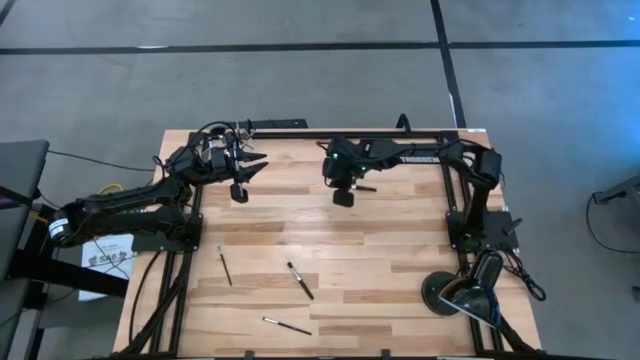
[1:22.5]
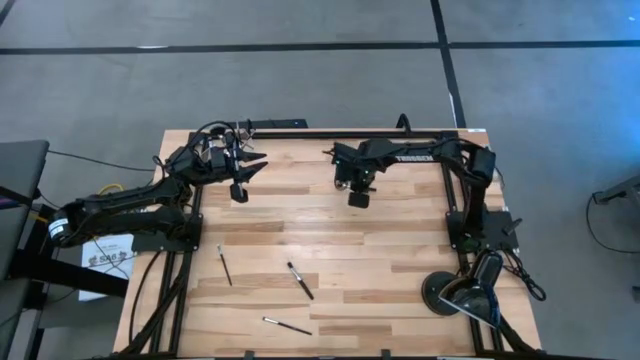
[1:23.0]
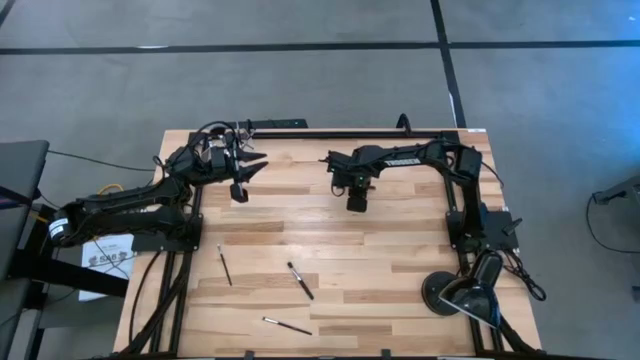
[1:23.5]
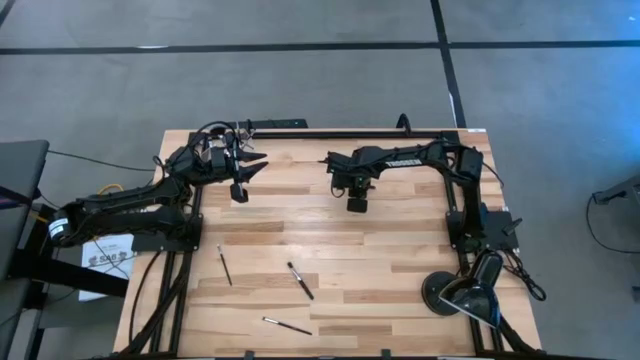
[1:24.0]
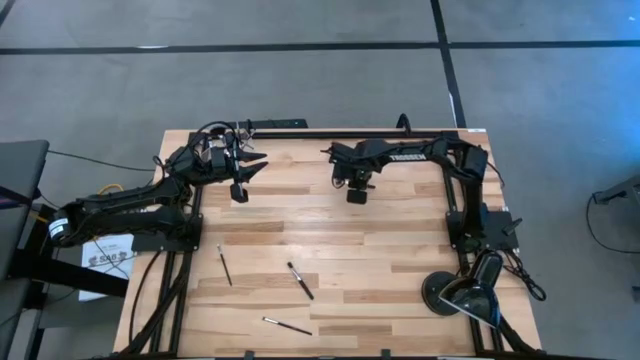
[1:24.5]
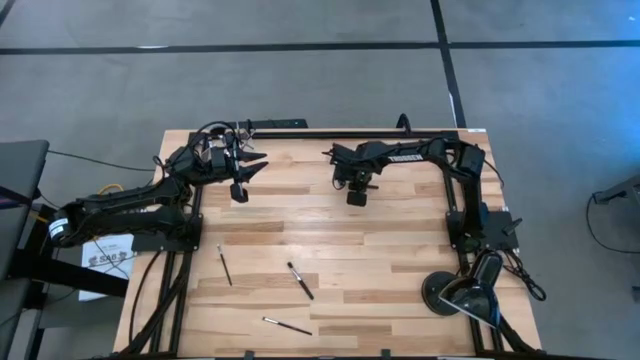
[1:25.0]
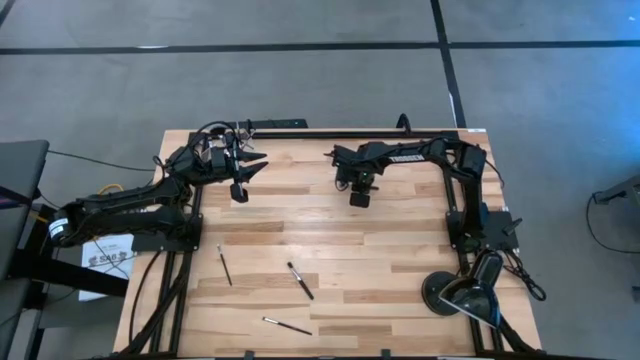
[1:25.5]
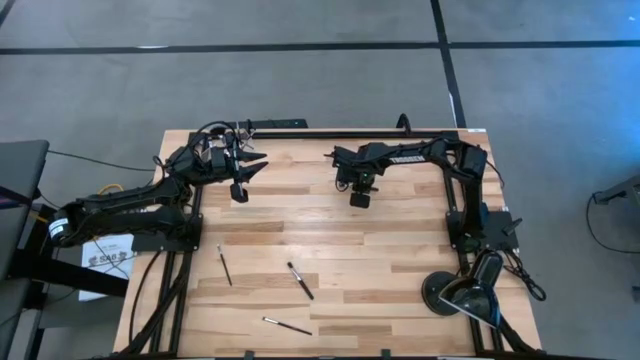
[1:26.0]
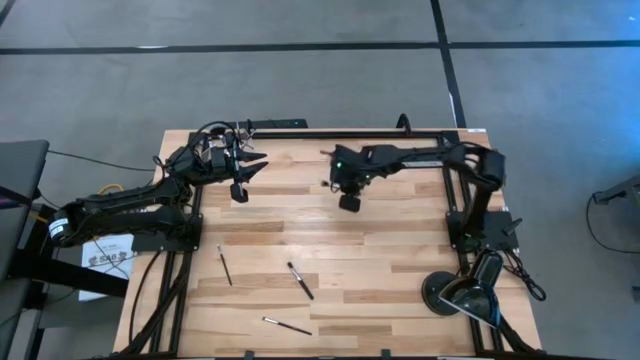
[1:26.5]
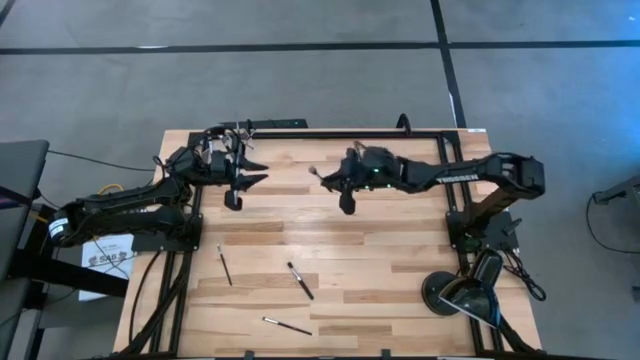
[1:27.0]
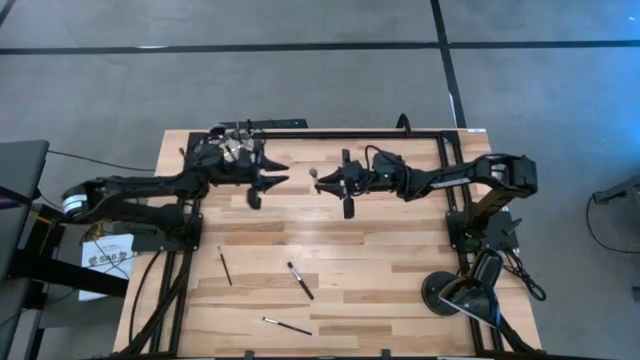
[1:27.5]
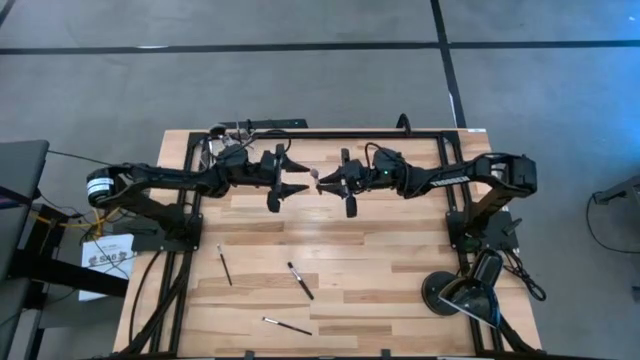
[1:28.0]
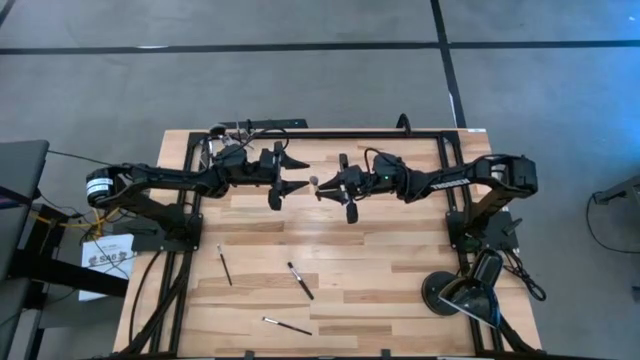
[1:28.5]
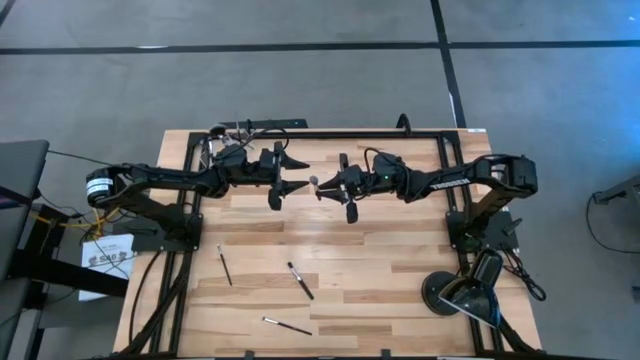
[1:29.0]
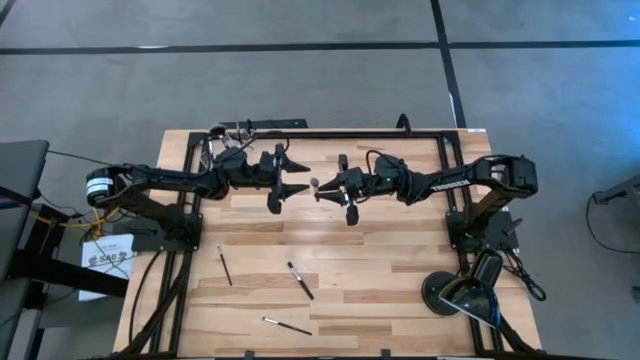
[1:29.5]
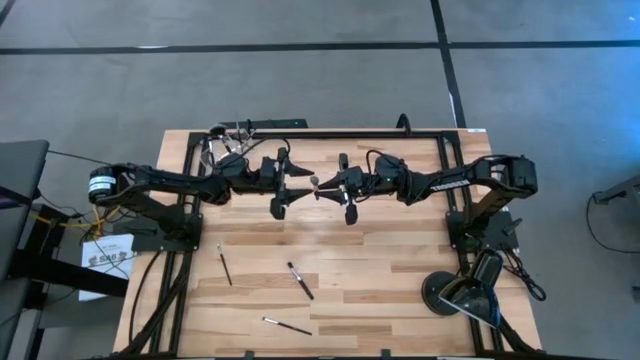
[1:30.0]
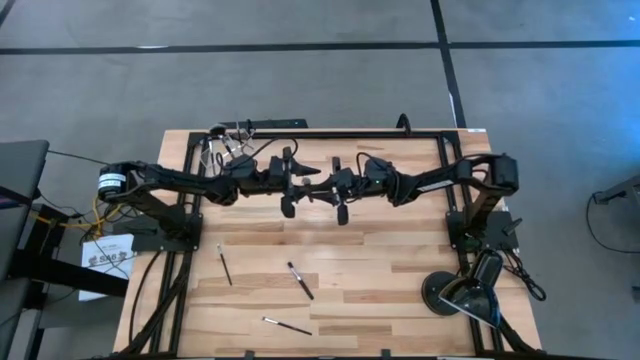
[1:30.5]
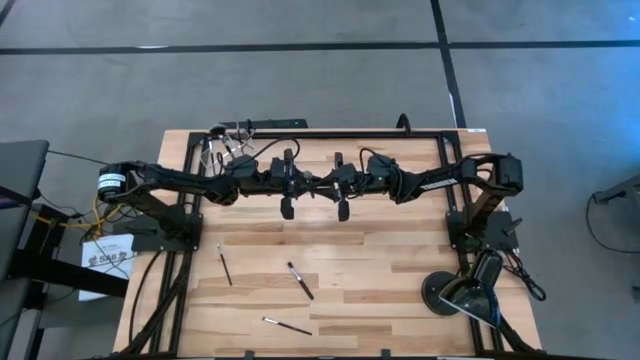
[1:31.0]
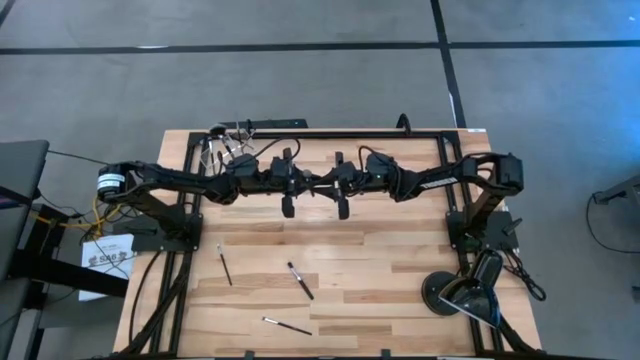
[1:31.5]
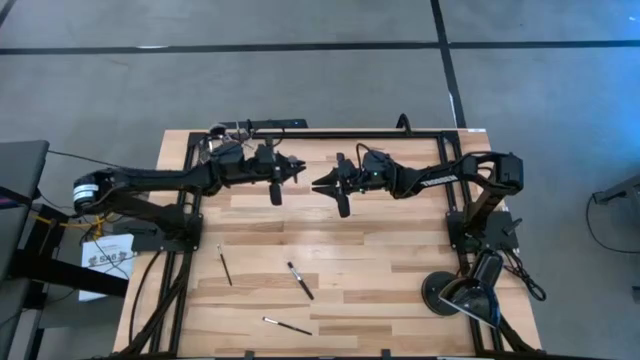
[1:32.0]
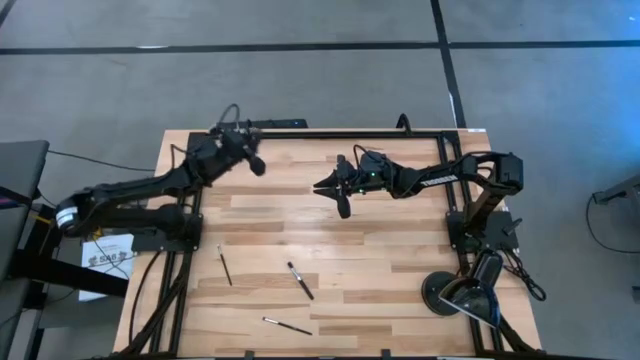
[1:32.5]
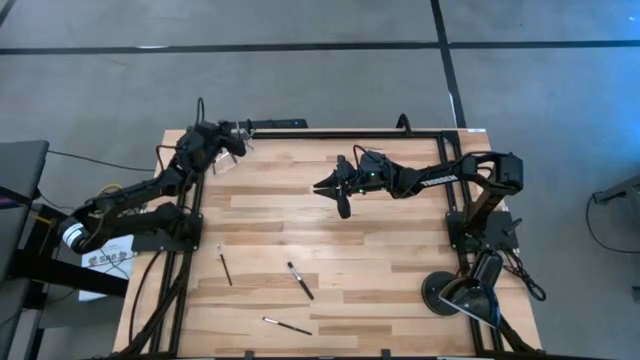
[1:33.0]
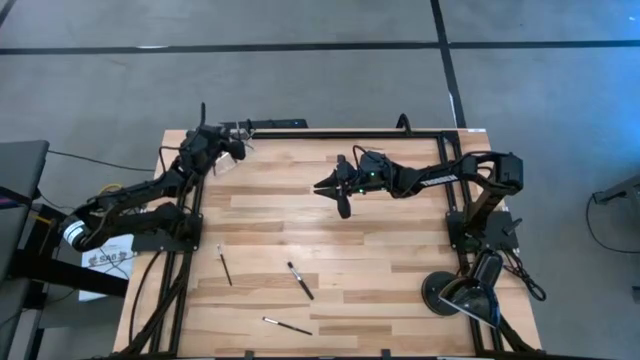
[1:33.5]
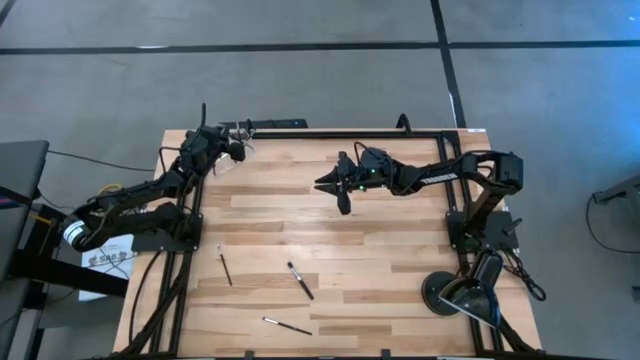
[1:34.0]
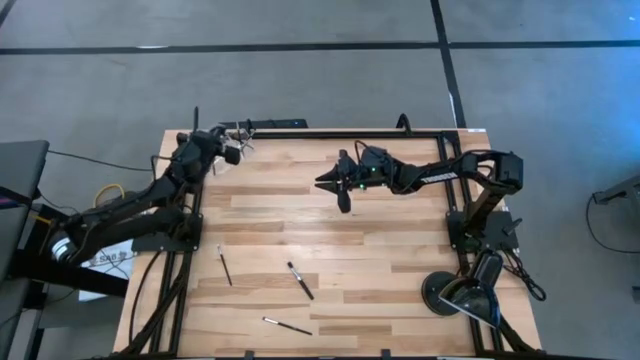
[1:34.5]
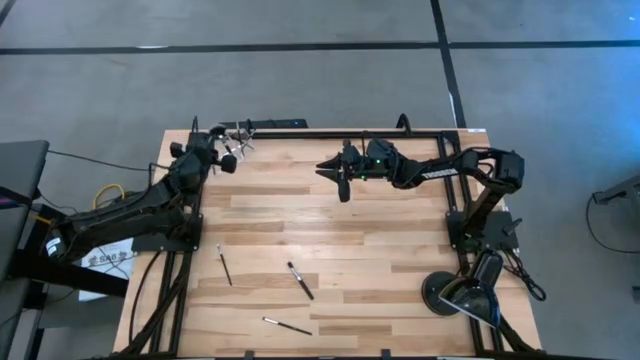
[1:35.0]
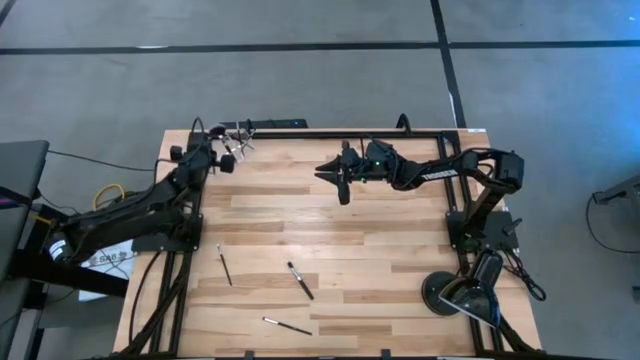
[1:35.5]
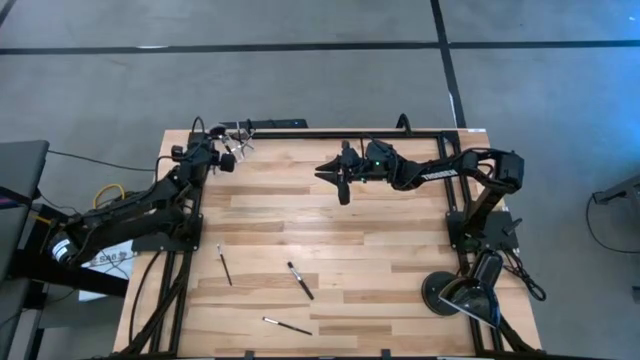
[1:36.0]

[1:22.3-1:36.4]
Task: Put items in baskets/containers
Put the powder brush into the transparent bin

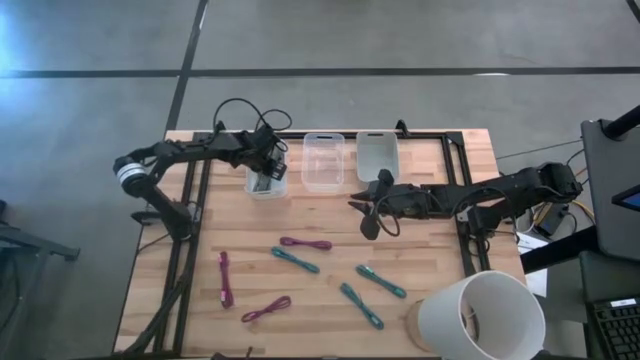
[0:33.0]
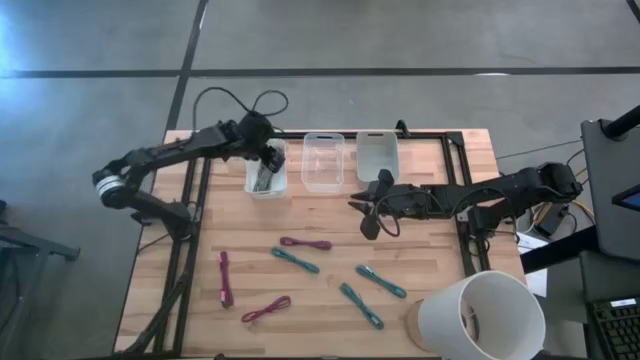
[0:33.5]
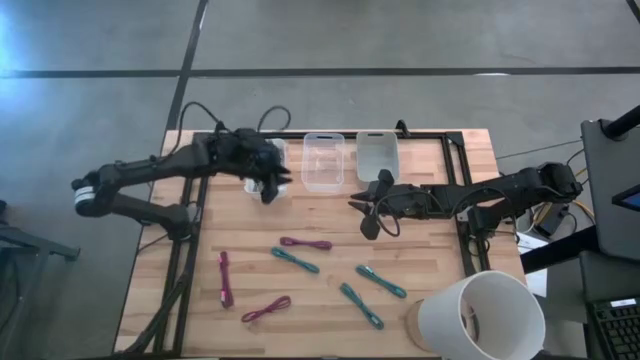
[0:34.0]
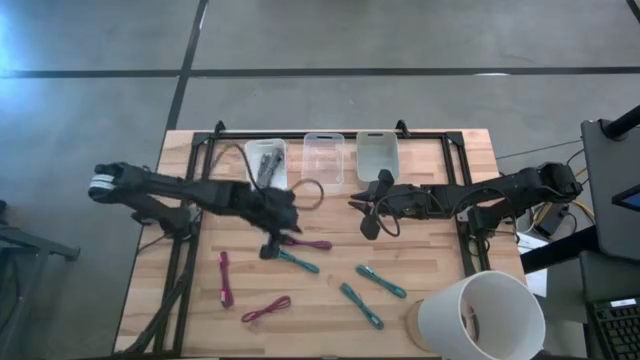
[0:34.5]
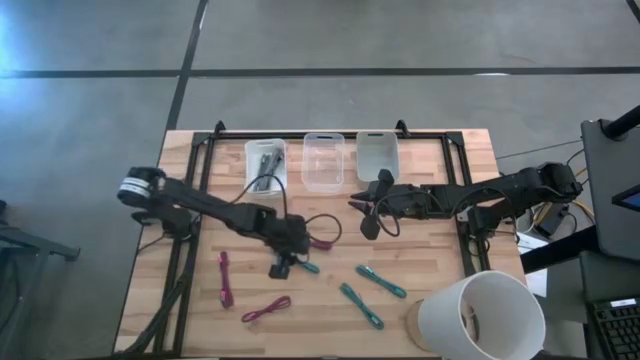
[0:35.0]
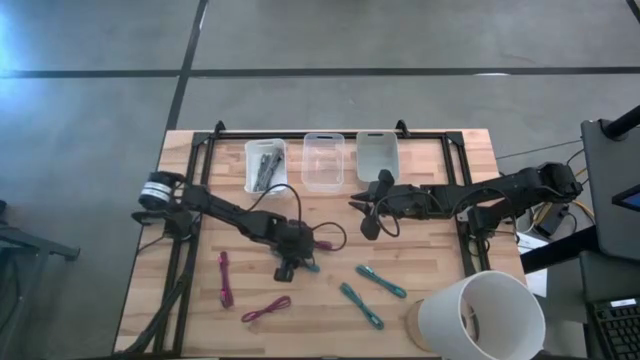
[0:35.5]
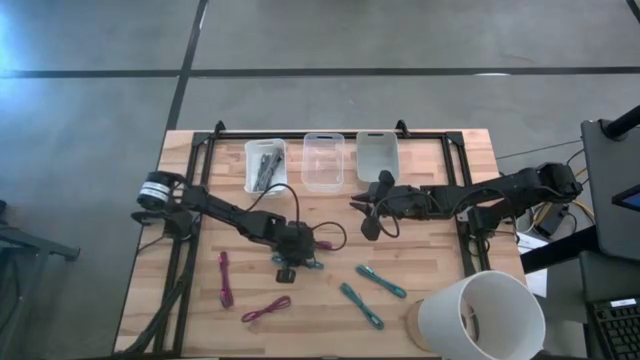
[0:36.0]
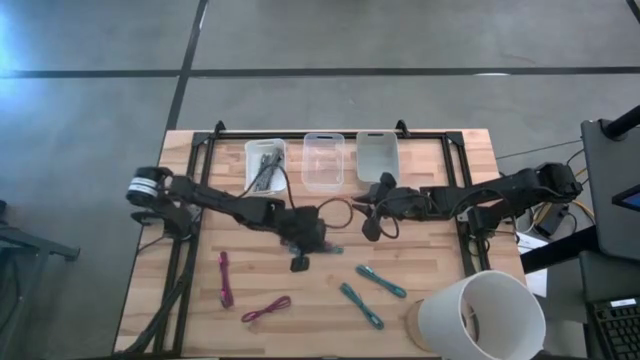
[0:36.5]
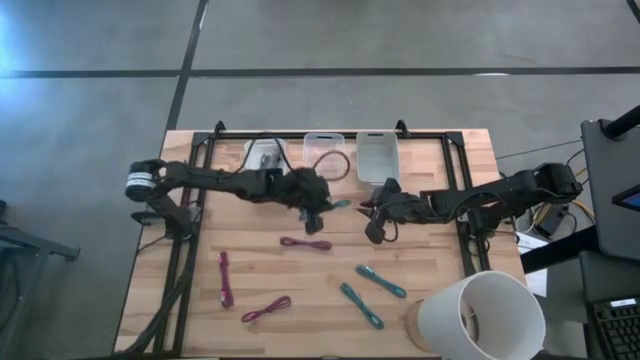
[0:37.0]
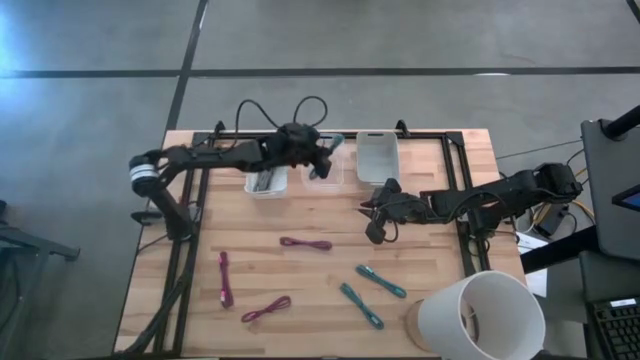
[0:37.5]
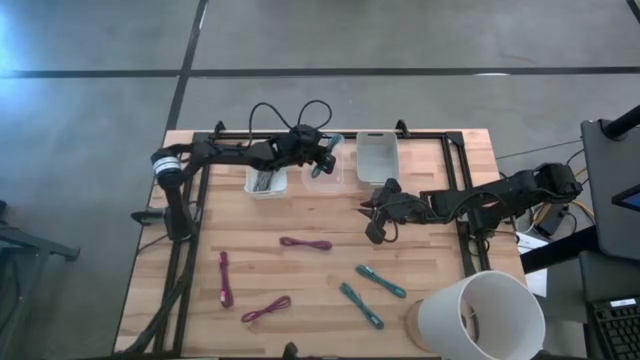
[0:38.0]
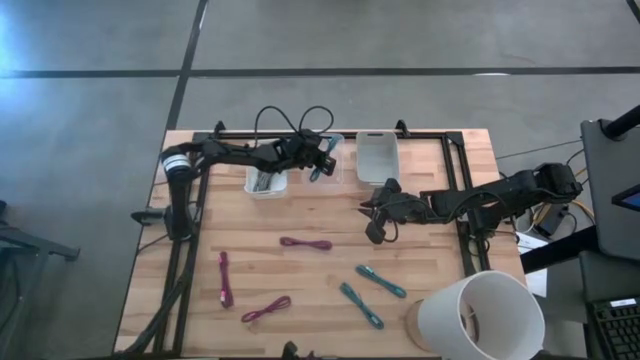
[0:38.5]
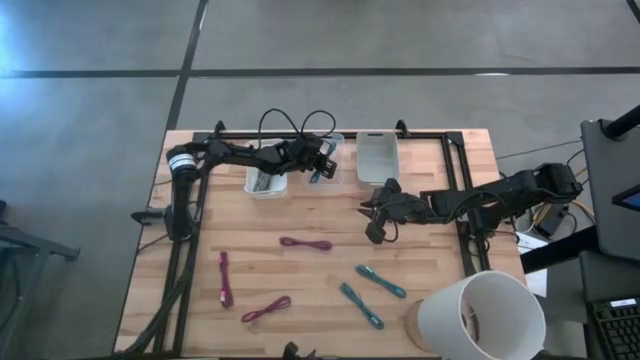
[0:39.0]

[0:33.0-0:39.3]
Task: Pick & Place USB Port
Put the top left blue charger cable into the transparent bin
